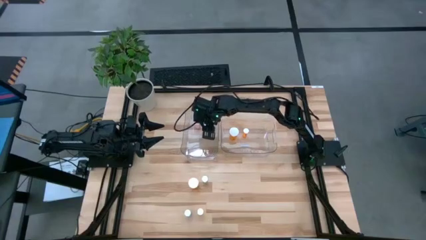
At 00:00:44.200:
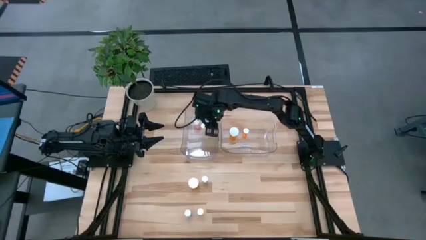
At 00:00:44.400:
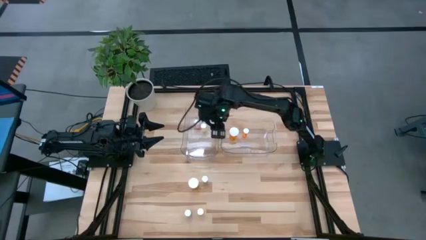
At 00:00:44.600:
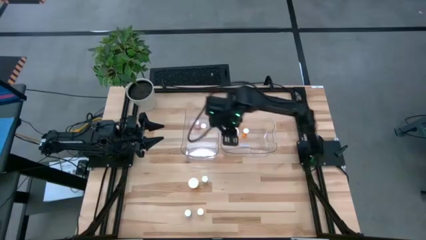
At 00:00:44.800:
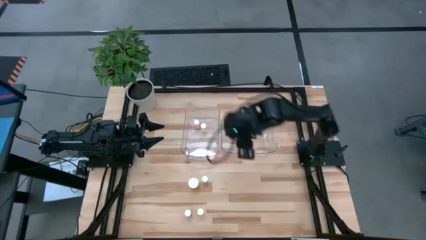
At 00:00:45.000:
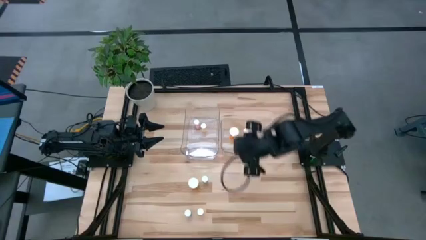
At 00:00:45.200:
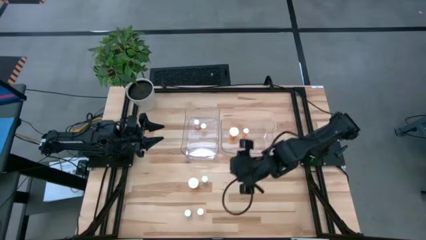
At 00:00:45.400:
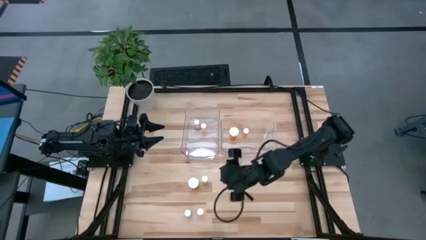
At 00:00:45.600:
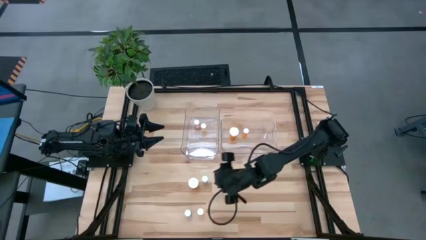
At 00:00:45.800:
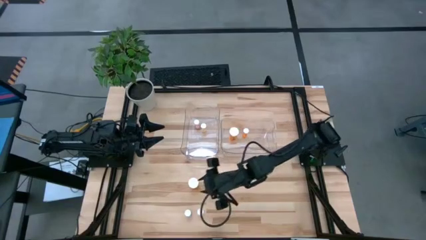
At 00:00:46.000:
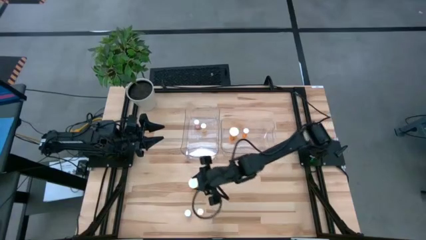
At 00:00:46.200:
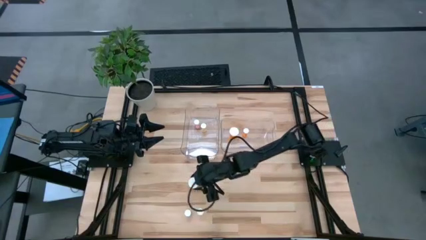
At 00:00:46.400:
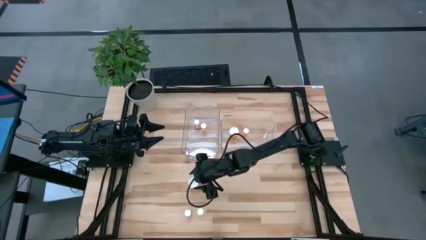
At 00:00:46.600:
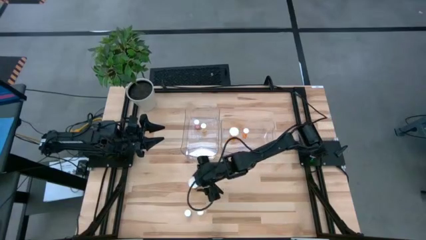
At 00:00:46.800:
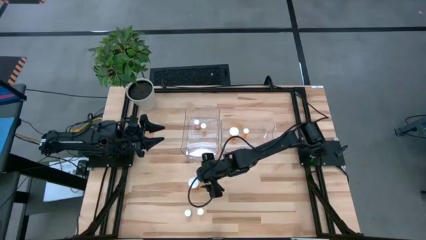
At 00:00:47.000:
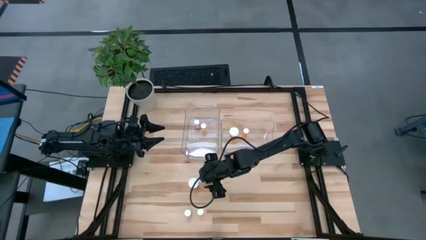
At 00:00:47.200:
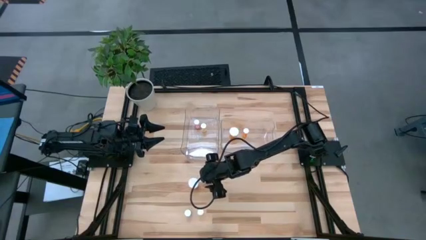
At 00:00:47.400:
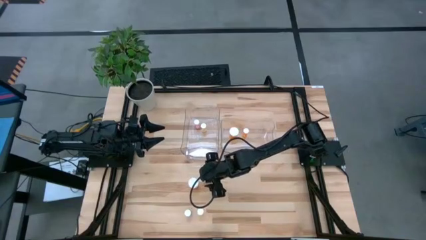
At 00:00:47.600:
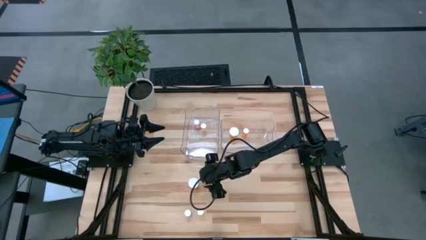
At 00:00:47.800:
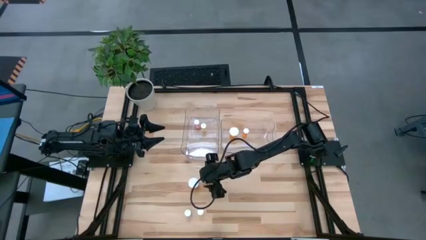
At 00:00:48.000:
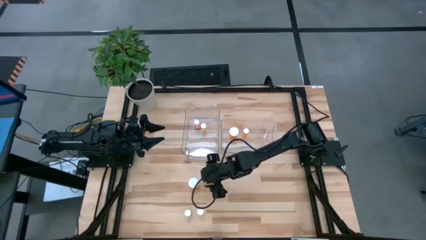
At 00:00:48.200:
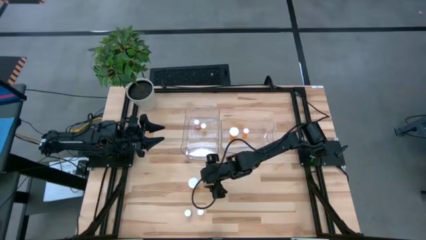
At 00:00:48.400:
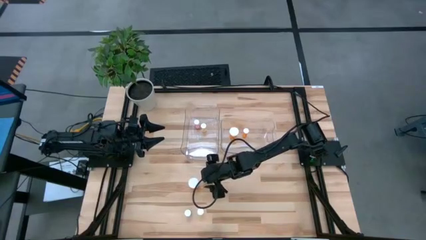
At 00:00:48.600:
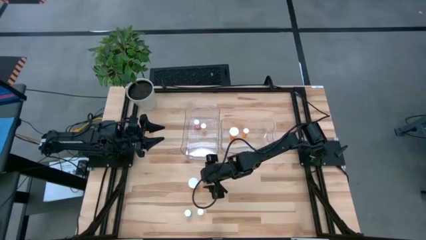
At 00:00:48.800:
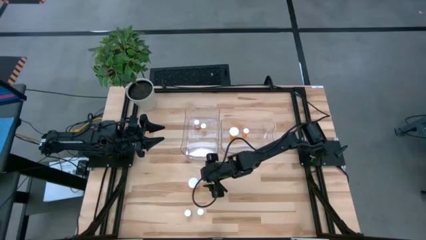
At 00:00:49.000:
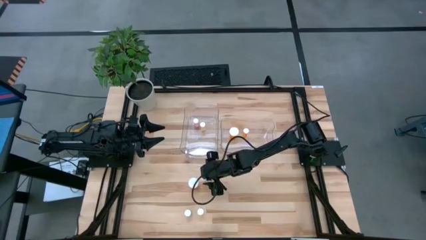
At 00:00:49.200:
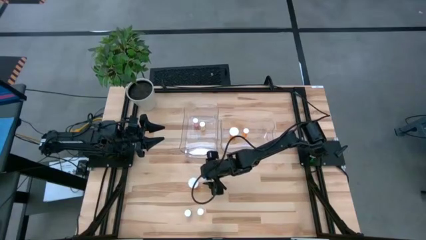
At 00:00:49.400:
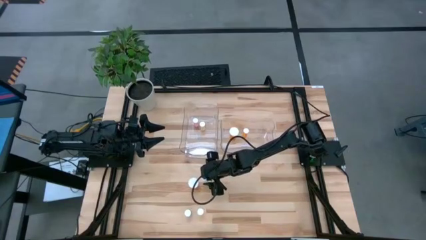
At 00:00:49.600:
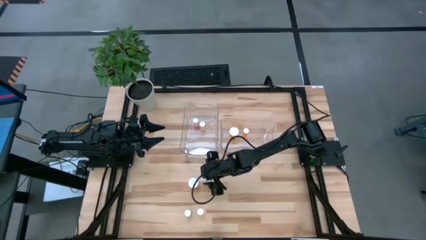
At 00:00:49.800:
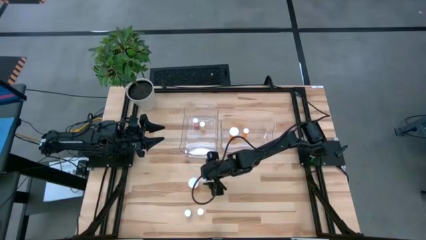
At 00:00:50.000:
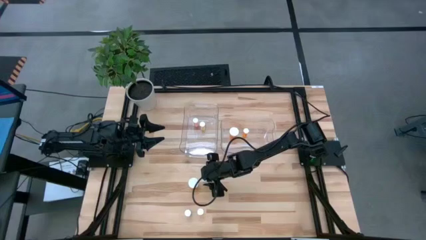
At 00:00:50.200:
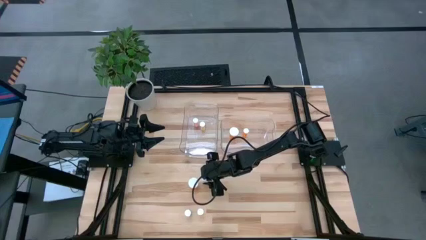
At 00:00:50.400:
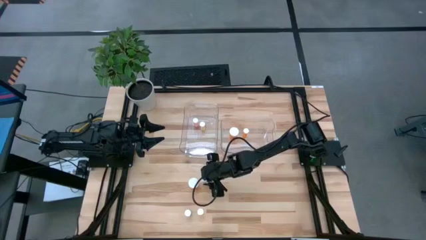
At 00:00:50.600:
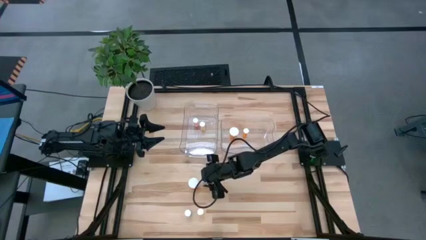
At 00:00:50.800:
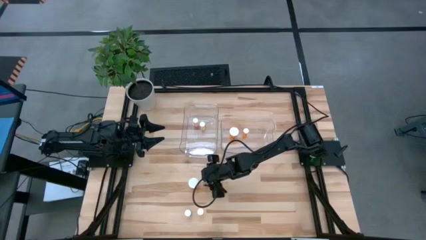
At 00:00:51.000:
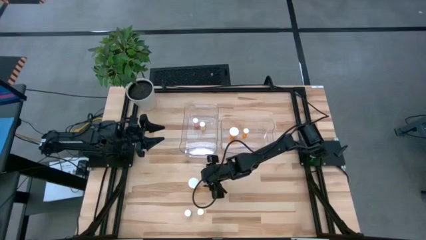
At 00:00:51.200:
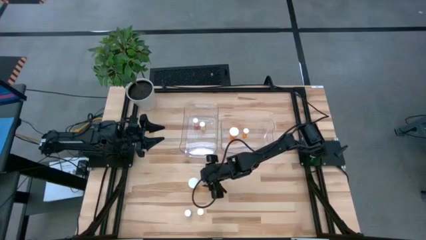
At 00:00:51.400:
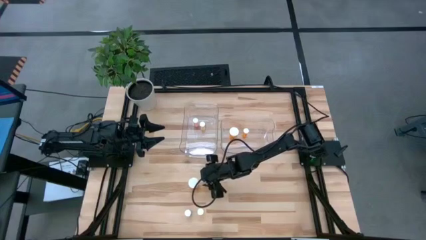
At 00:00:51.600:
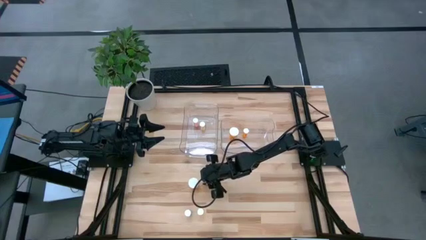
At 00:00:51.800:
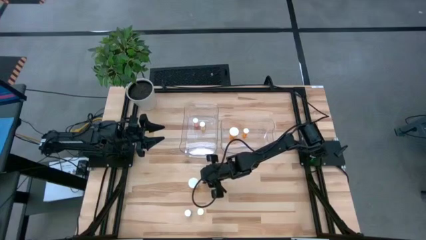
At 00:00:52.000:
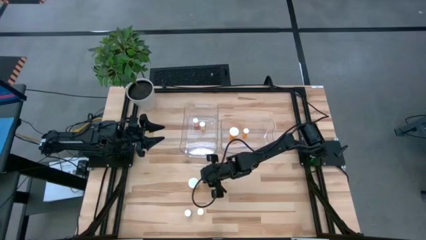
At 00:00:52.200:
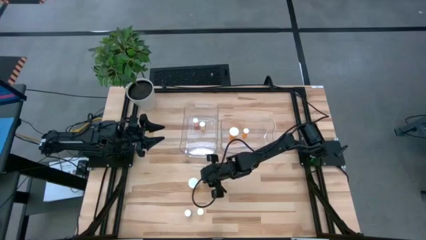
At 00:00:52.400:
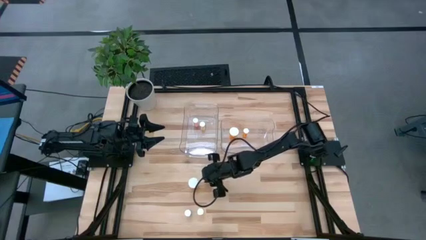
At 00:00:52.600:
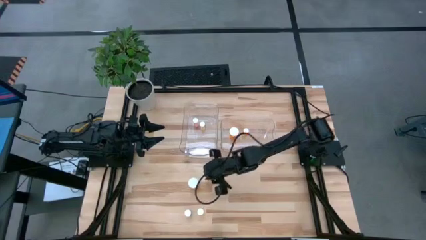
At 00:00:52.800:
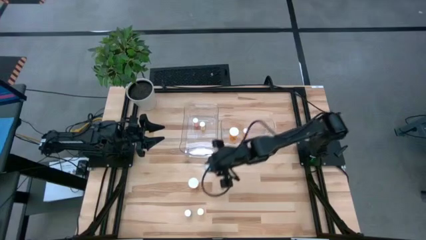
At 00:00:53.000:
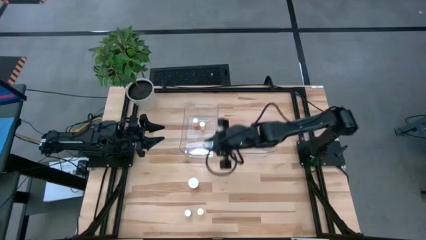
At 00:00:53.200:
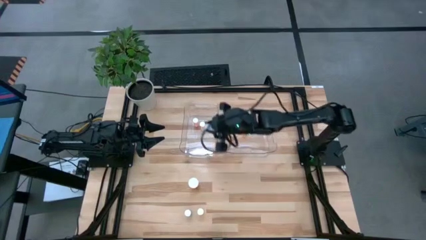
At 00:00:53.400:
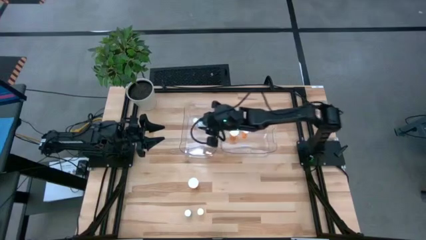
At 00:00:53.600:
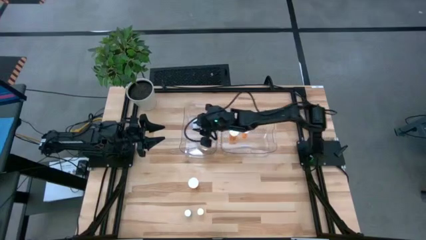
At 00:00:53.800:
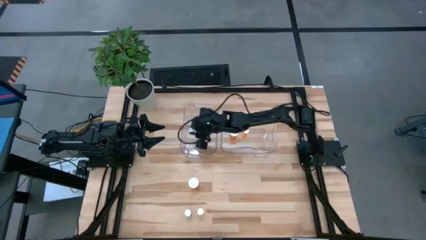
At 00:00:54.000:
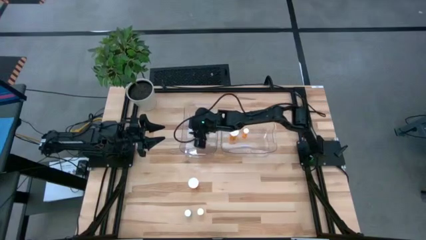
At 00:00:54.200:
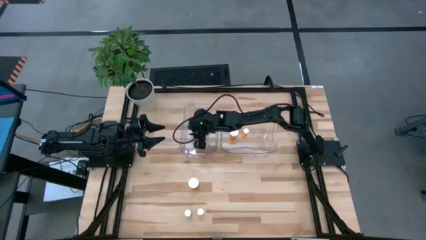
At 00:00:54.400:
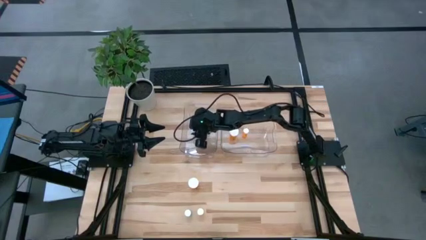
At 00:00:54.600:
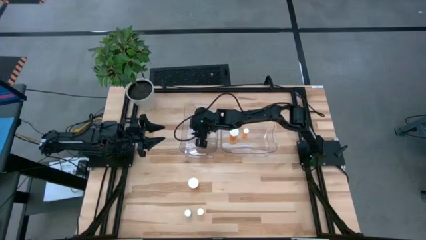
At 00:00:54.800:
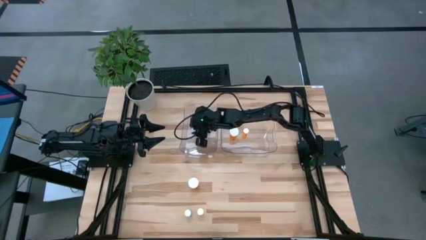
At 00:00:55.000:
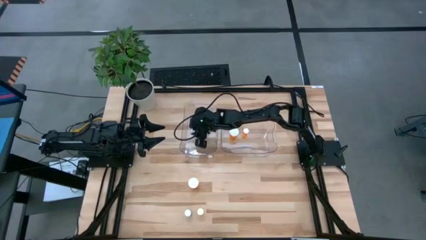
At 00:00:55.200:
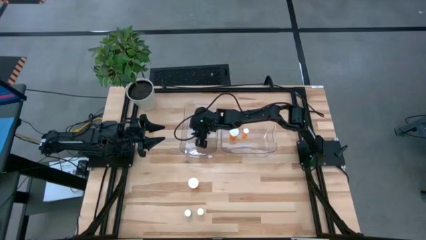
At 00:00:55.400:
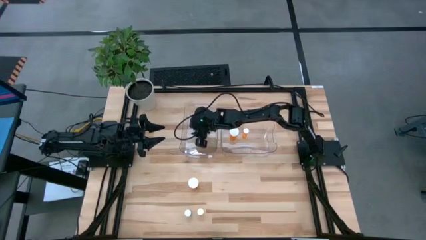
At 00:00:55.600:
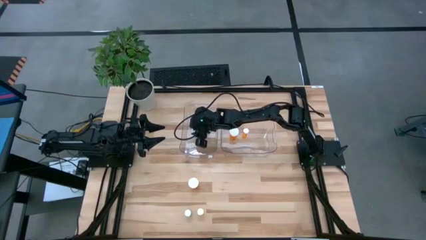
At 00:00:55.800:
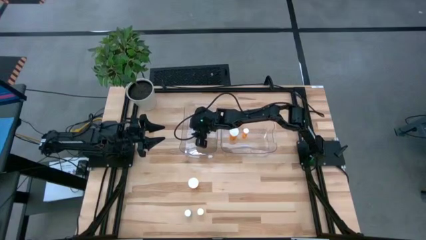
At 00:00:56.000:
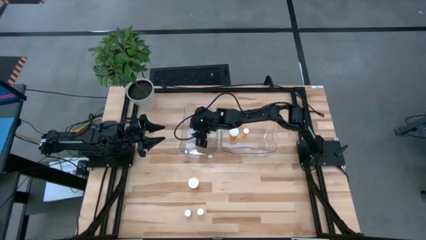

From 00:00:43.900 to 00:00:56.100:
Task: Pick and place medicine bottles into bin by pill shape (circle, oval)
Put the top blue pill bottle into the left transparent bin

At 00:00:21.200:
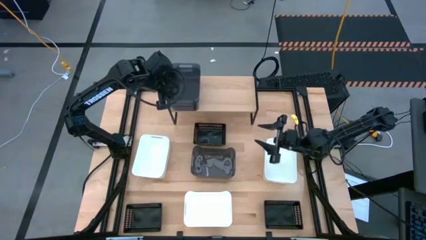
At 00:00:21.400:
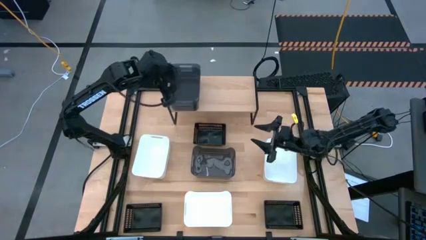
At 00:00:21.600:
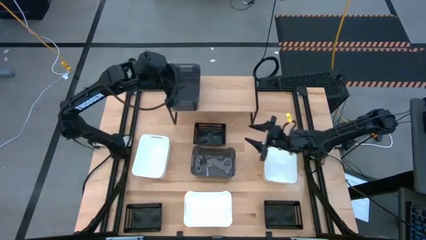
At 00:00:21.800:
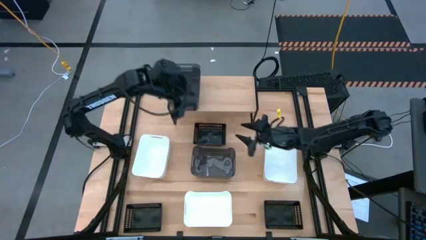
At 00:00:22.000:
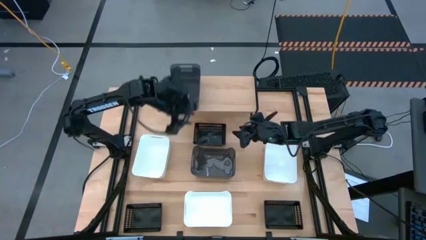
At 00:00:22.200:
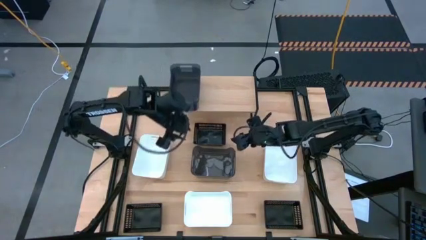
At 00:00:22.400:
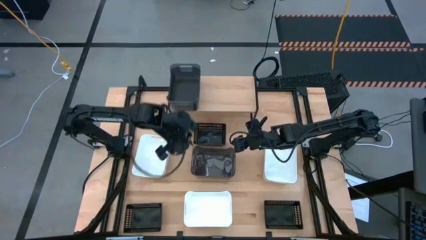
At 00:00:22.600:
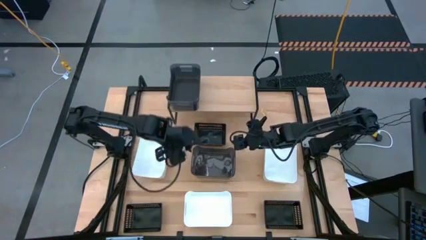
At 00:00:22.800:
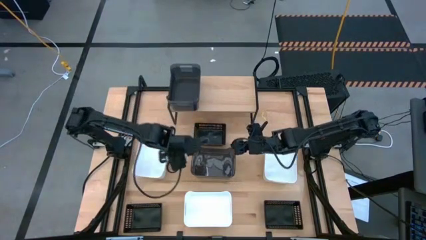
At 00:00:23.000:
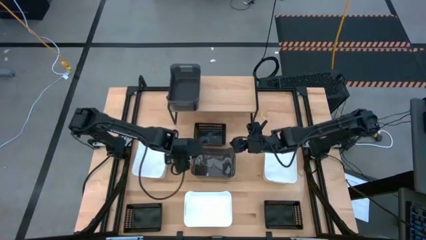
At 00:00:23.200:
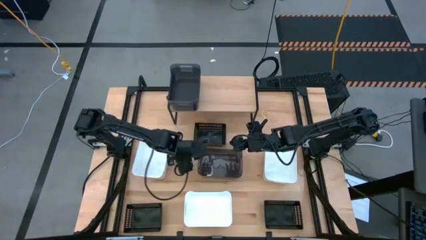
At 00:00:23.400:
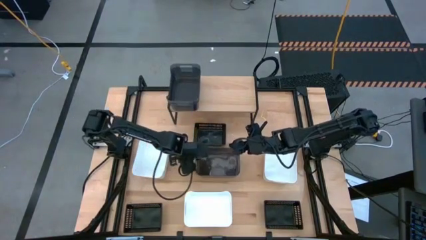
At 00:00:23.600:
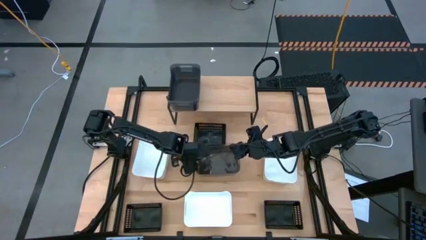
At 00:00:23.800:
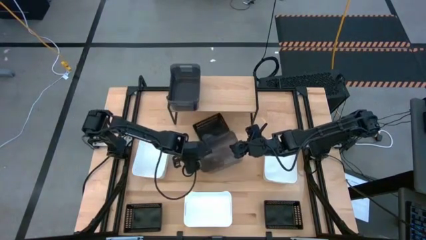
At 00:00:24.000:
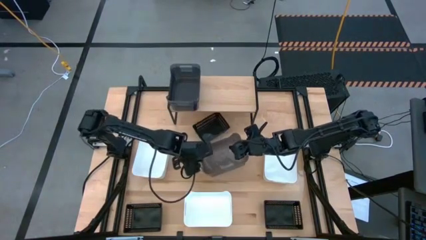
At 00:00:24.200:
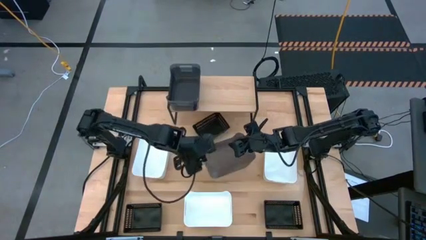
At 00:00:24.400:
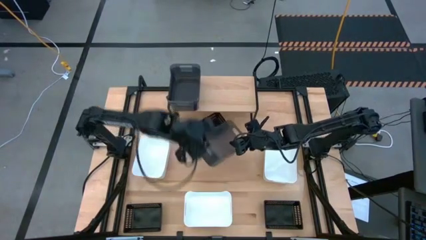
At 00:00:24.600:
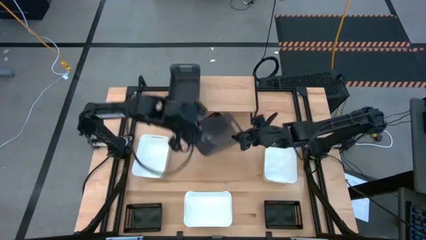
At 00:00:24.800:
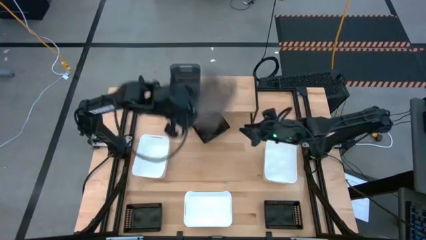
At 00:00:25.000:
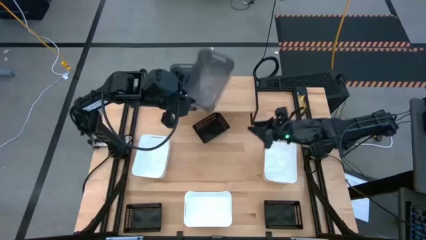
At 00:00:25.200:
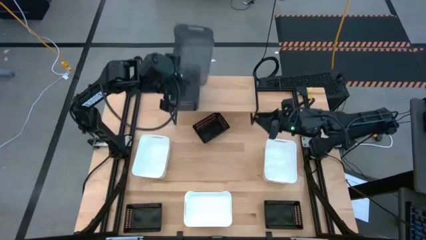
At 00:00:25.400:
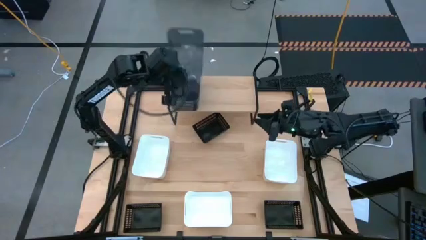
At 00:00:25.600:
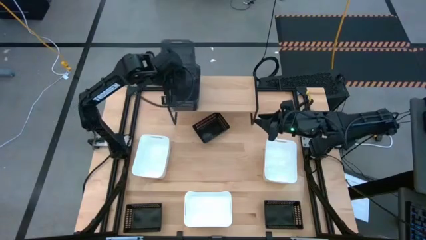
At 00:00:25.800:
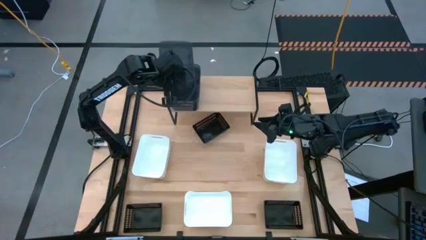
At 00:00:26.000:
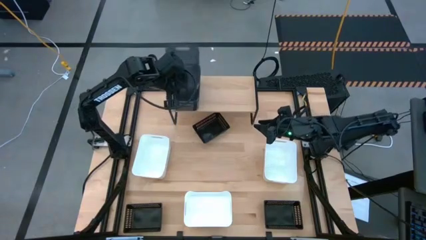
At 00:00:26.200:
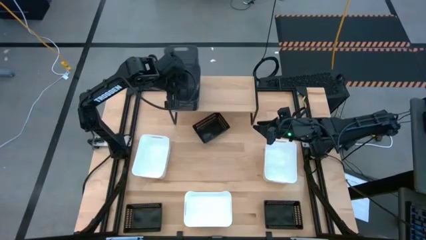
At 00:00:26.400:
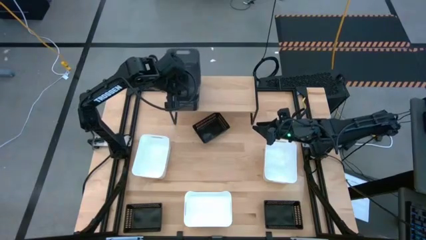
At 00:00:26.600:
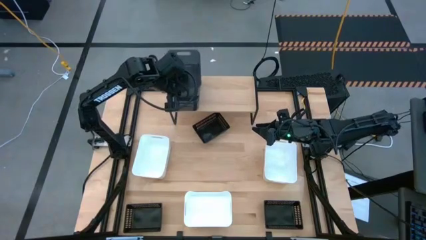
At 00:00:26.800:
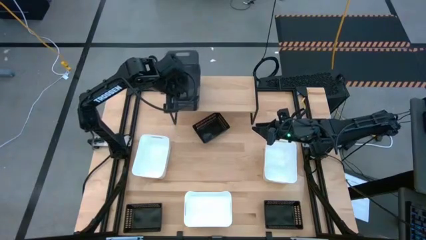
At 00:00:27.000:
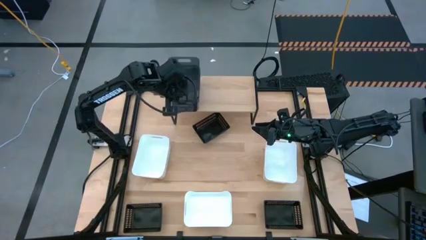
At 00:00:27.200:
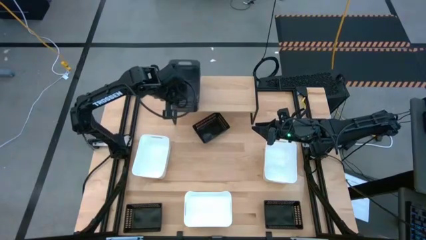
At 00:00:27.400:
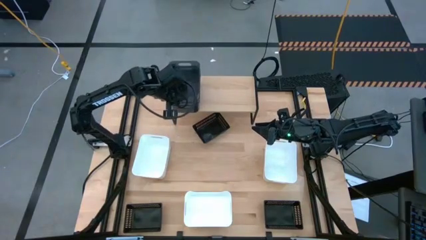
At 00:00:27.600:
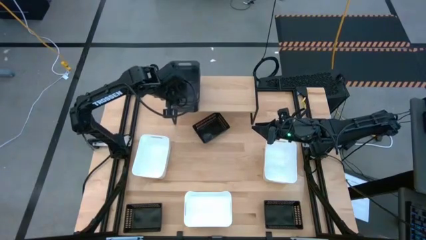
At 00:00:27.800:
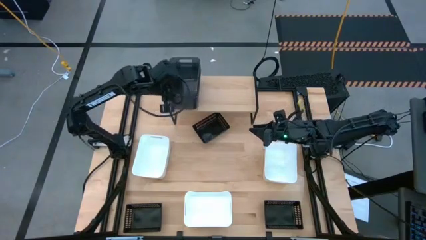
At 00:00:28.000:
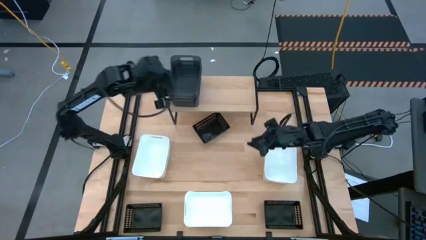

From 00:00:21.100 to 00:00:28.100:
Task: Stack baskets on shelf by color
Stack the gray bin on top of the gray bin on the shelf
